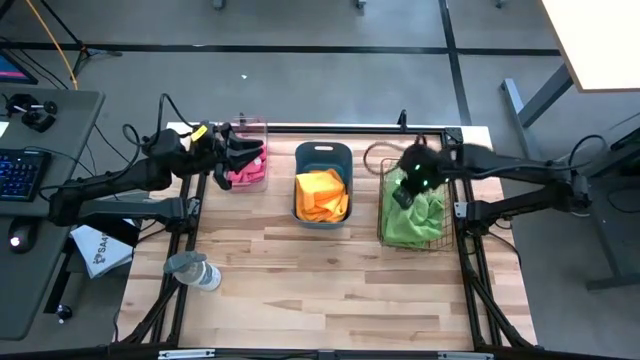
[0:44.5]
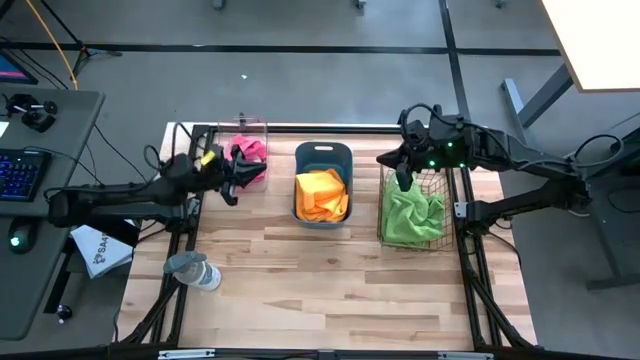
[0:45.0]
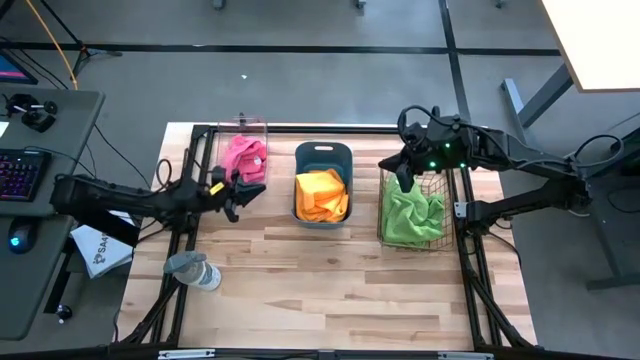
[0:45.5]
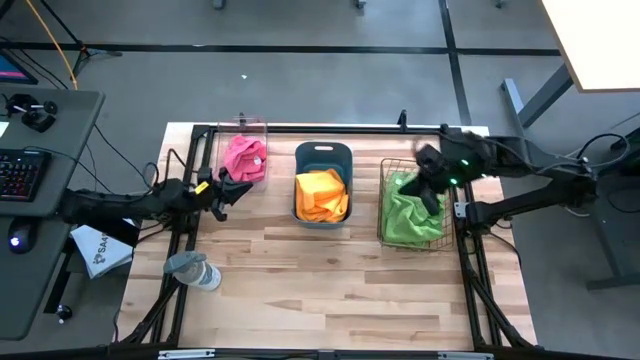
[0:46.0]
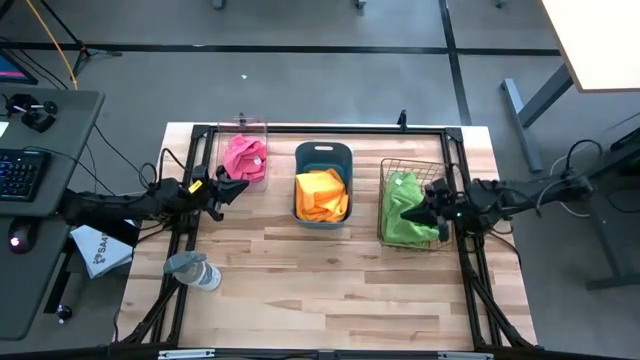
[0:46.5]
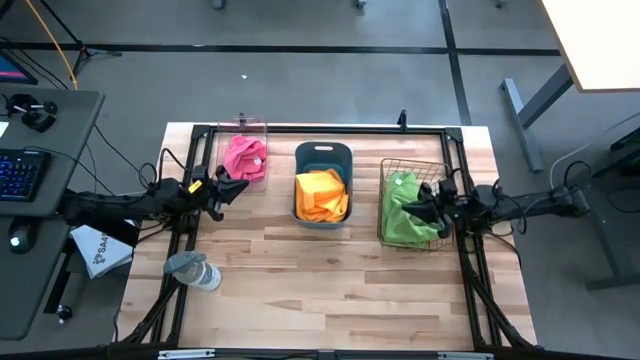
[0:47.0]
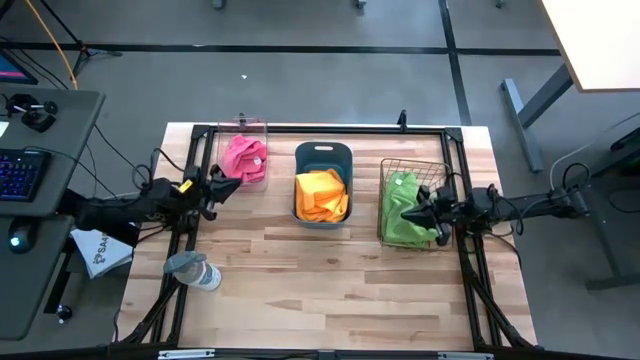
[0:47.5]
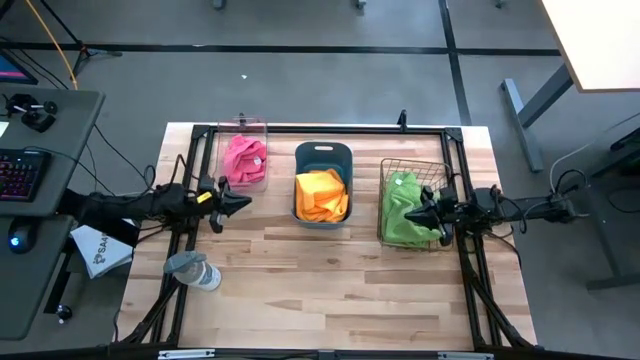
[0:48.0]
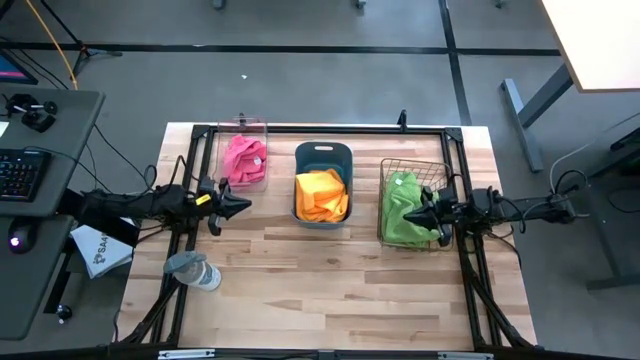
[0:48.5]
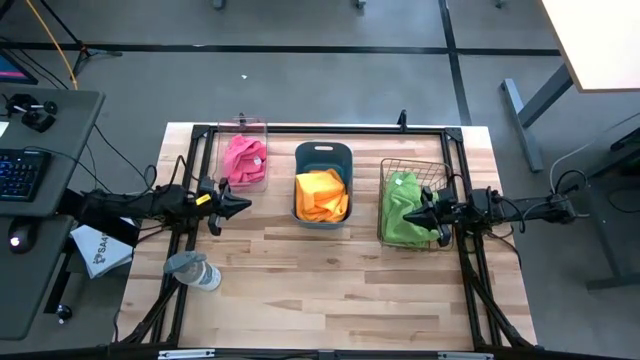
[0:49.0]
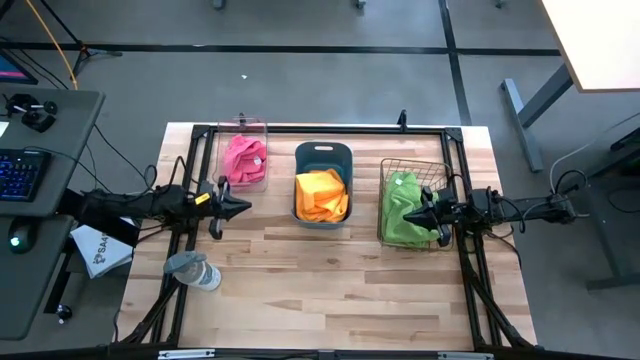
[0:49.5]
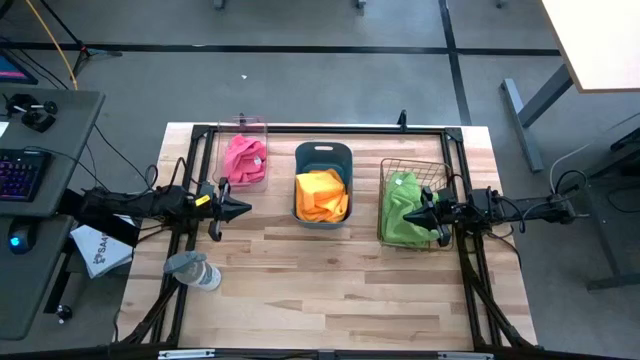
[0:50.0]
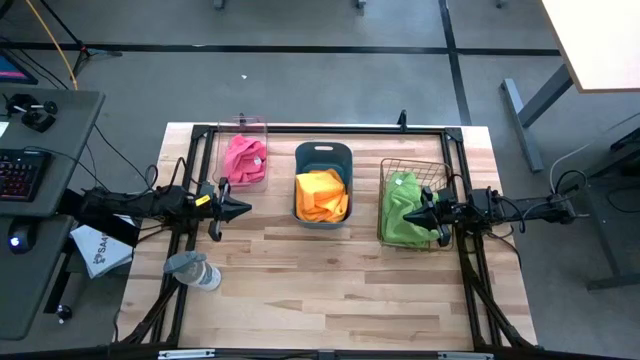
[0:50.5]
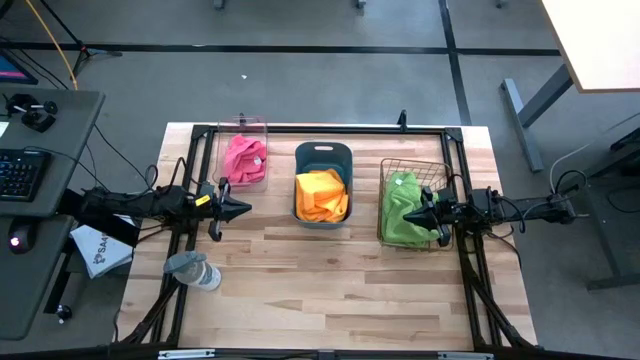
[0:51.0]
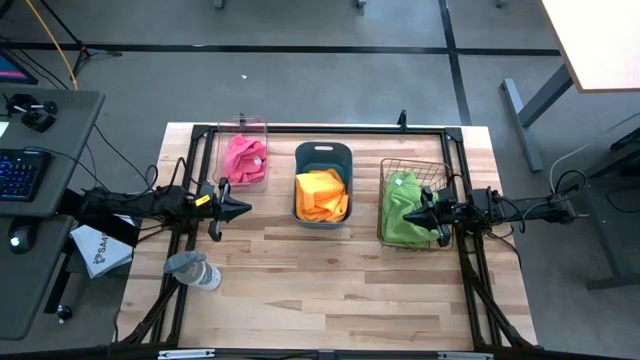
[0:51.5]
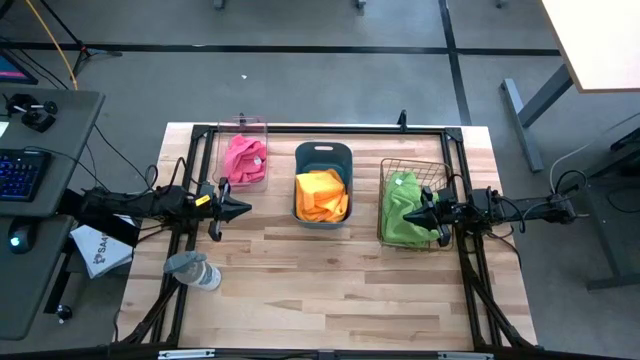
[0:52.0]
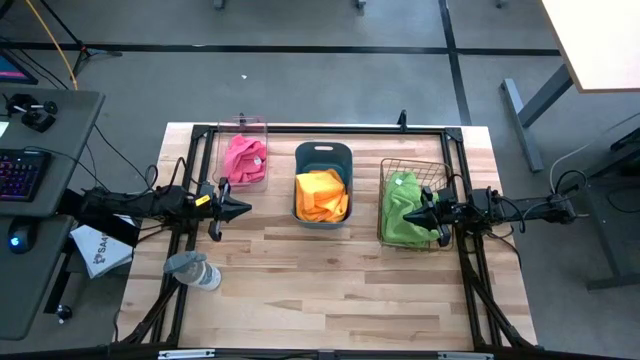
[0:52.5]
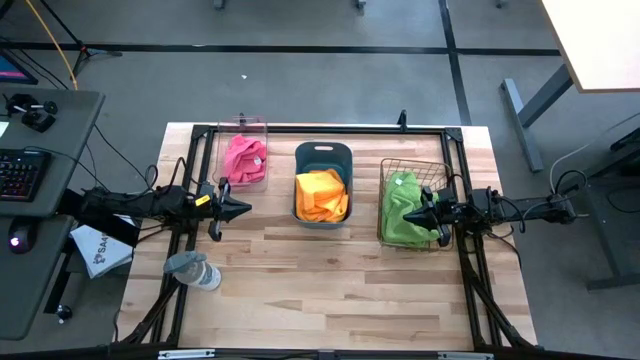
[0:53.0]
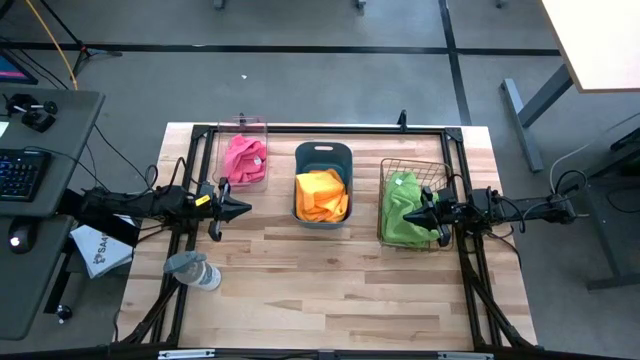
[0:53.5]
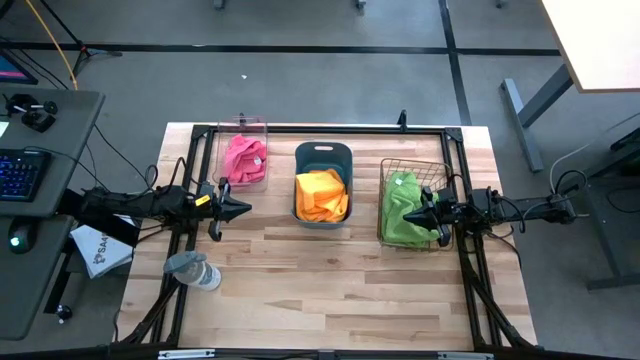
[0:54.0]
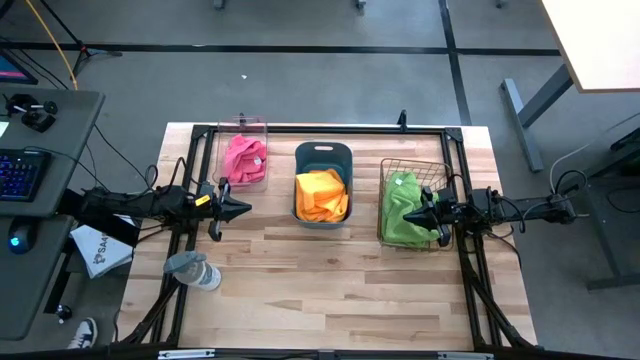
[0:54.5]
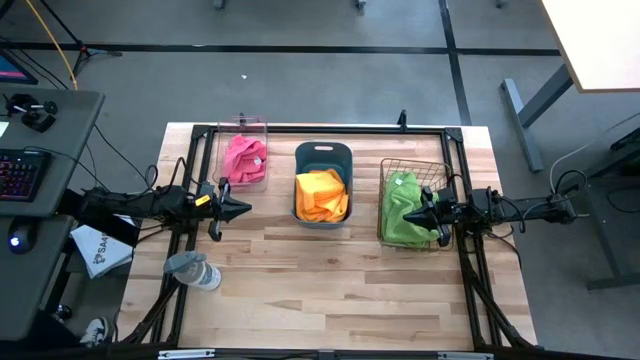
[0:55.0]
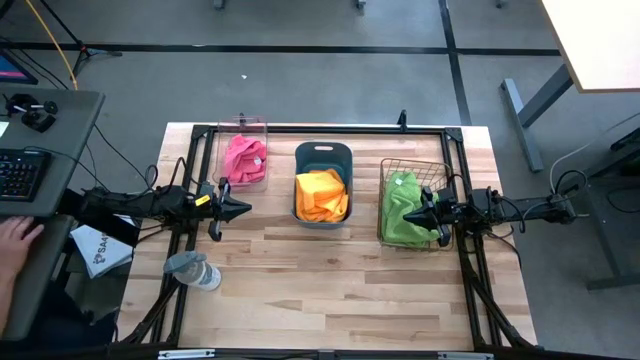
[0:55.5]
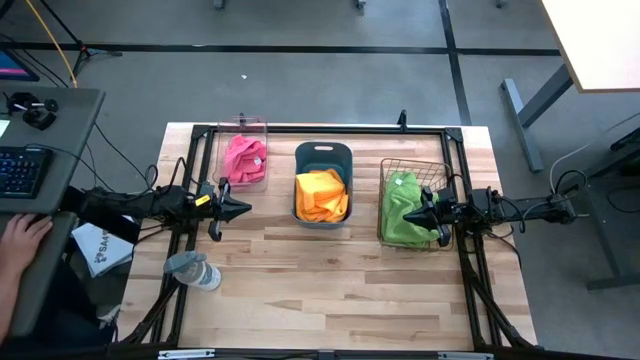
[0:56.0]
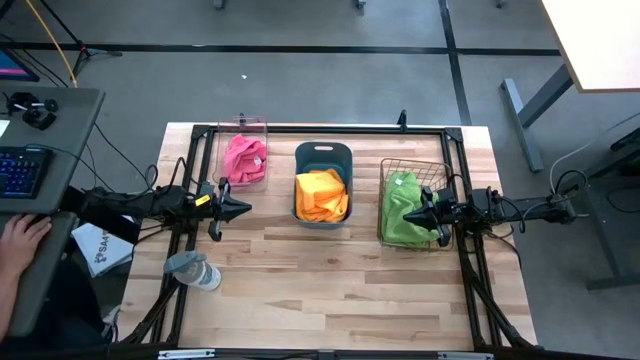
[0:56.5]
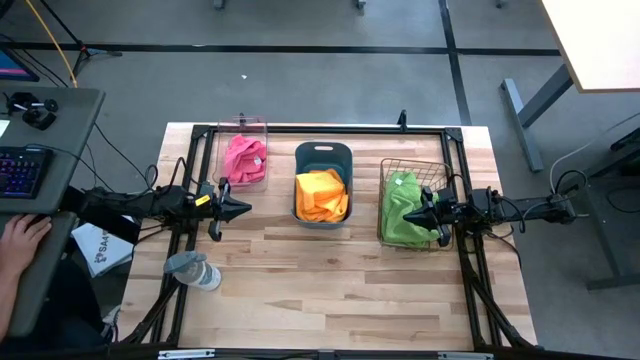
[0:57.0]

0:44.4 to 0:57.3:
Task: Sort microfiber towel by color & place in baskets
Return to Home Position

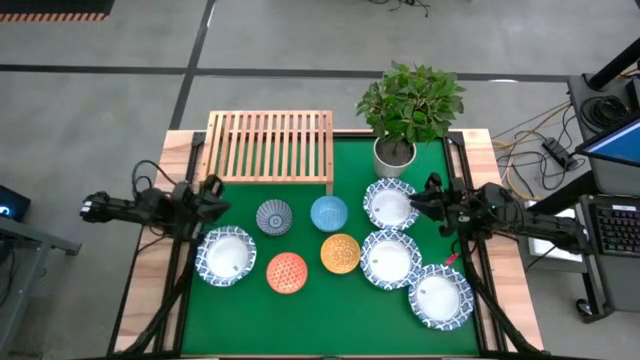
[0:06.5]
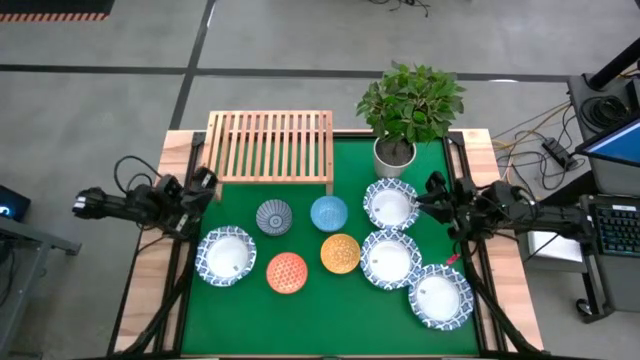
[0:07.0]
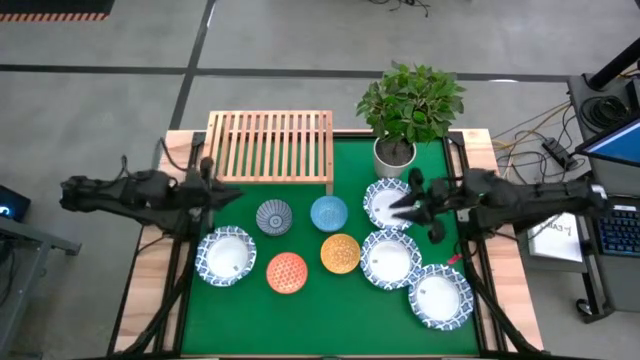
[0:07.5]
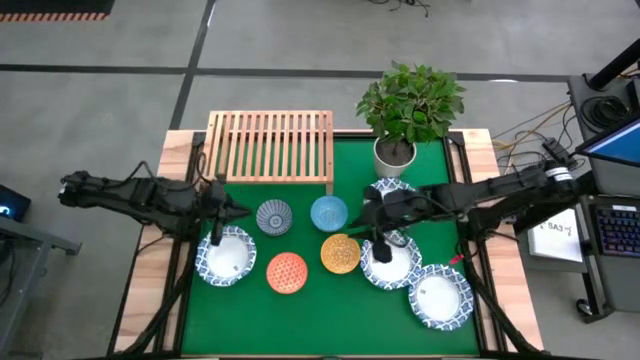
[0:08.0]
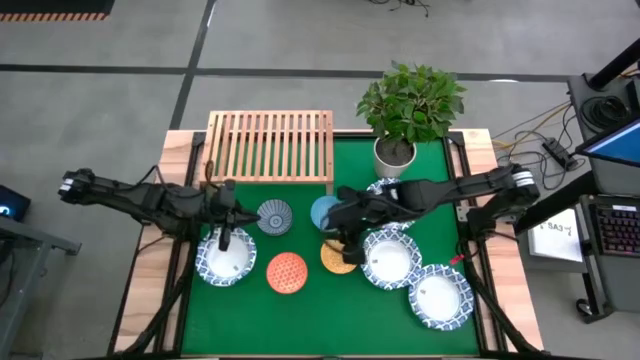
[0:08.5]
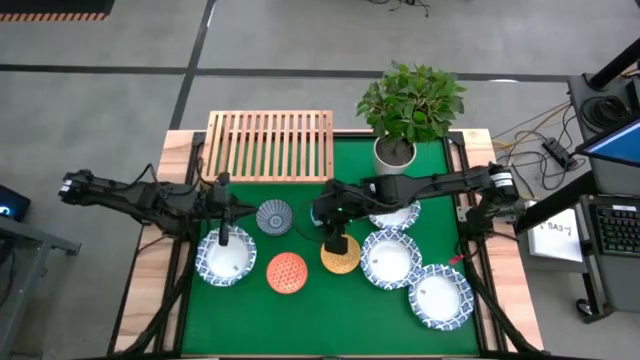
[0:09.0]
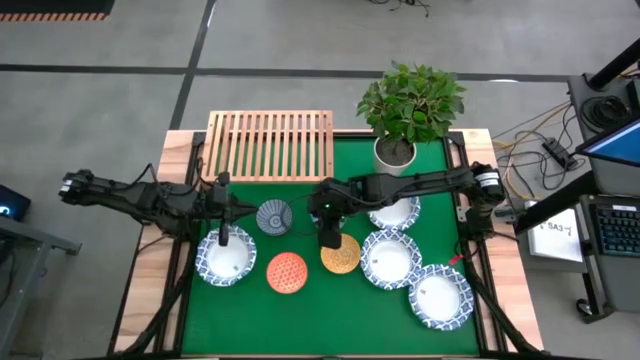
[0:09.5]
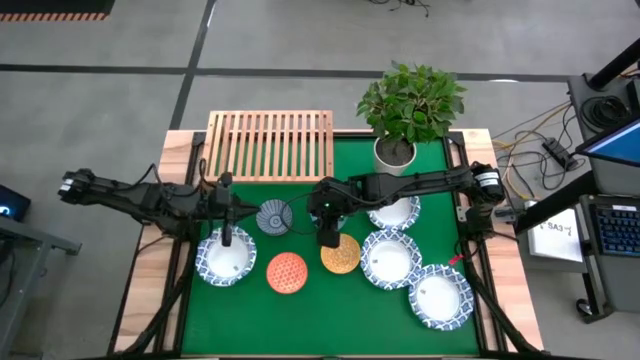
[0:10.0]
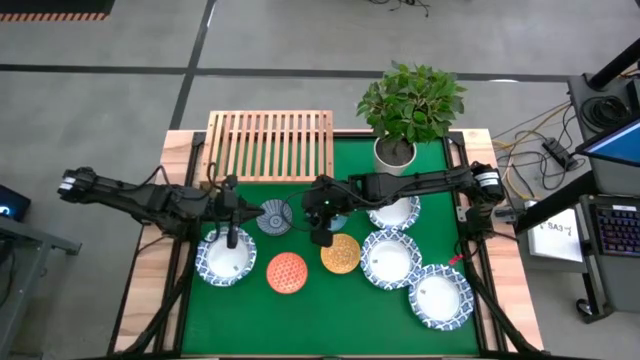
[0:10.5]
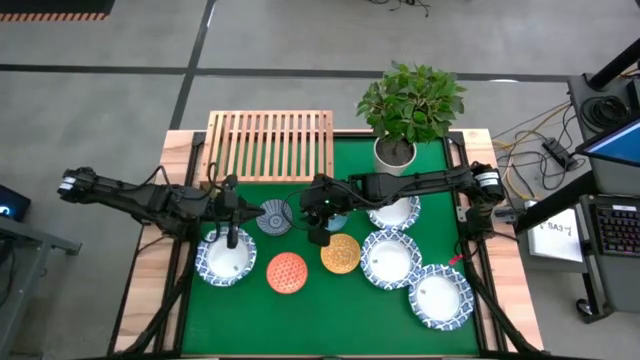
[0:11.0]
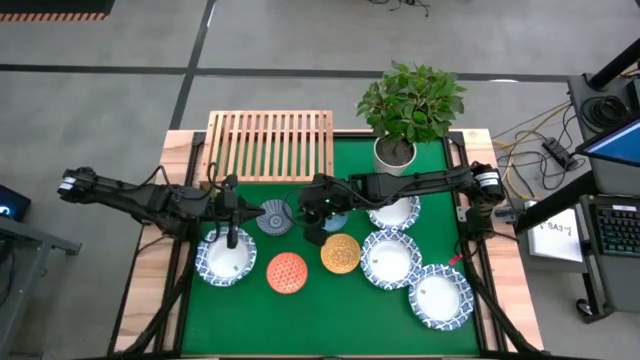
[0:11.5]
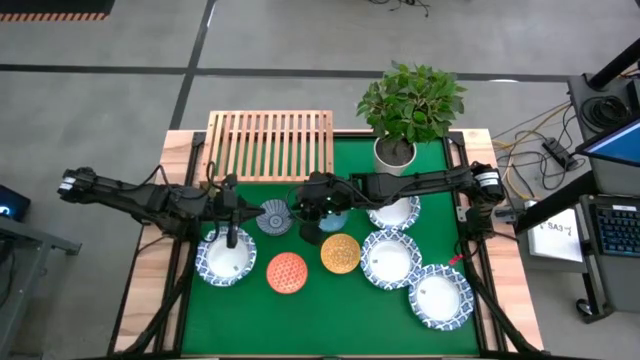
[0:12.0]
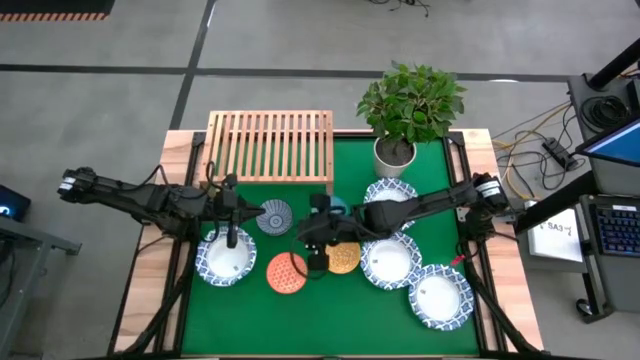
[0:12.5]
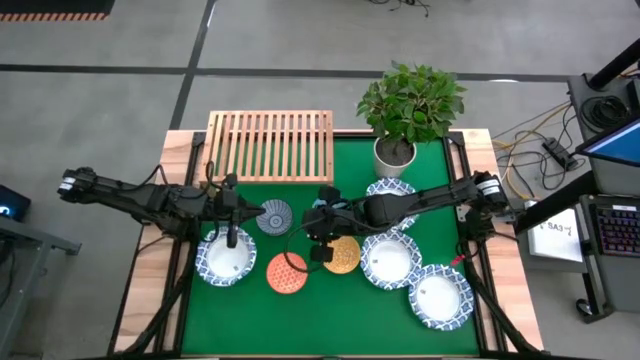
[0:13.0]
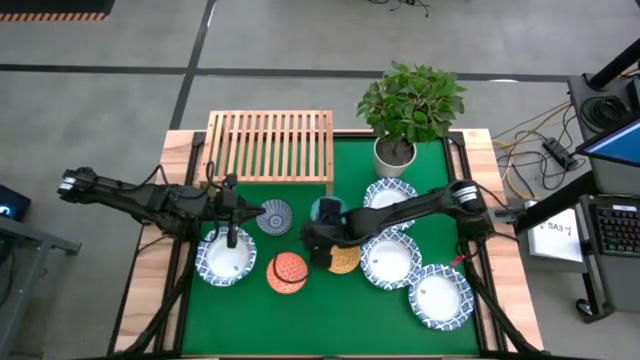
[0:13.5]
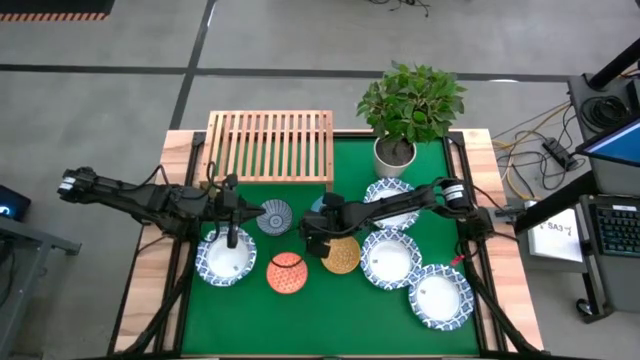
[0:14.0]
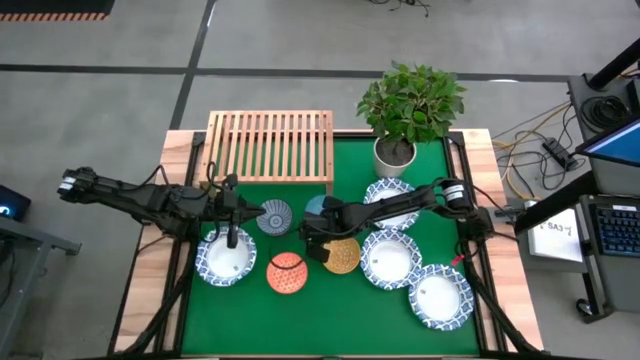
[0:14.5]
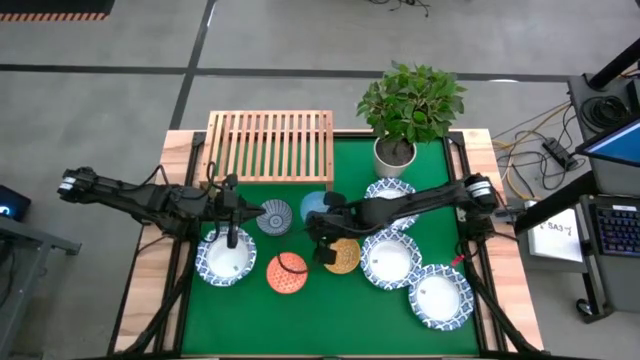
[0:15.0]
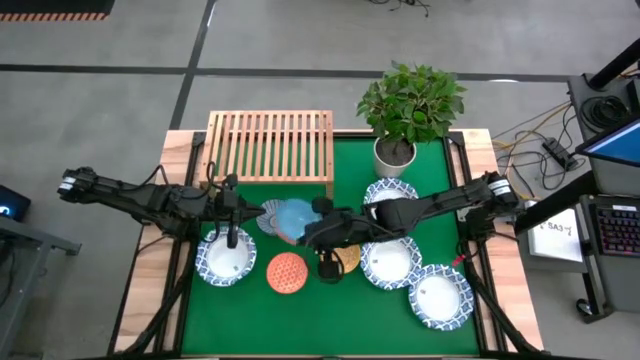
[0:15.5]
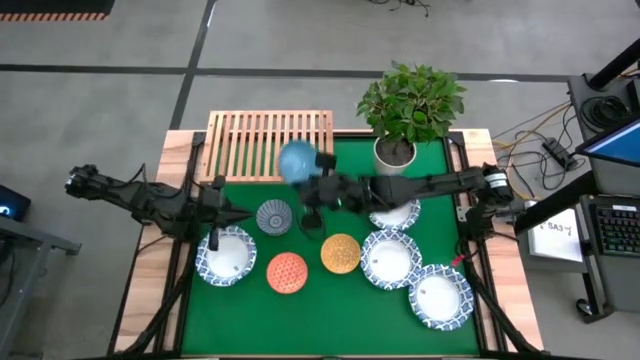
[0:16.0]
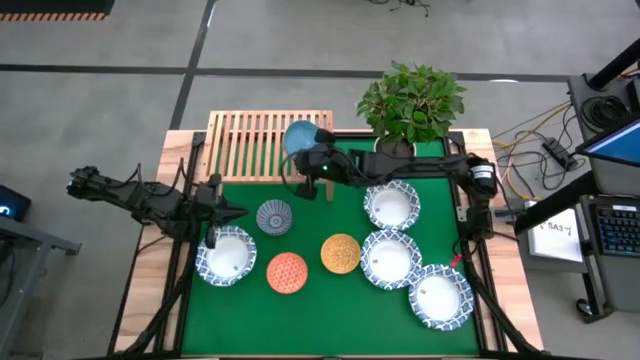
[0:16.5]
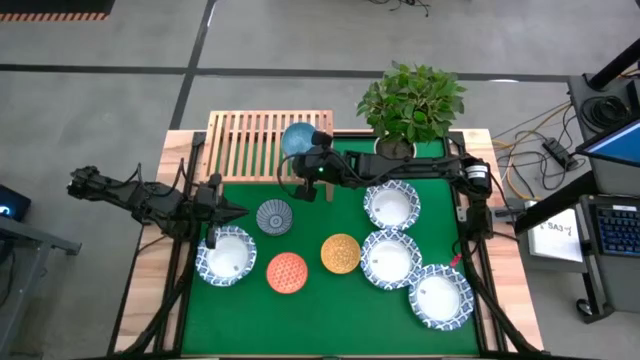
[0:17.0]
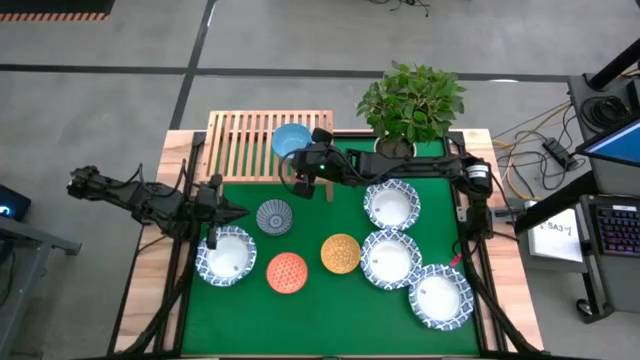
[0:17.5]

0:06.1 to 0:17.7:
Task: Place and stack bowls onto a shelf
Put the light blue bowl on the shelf
